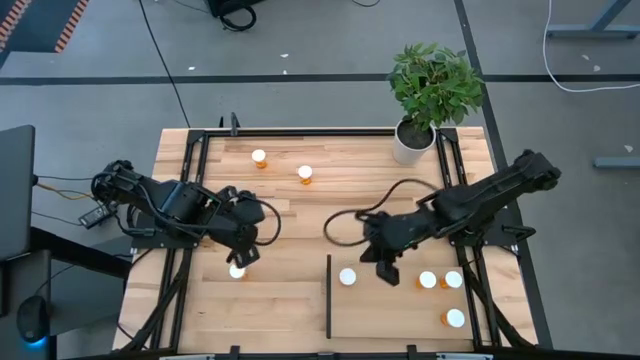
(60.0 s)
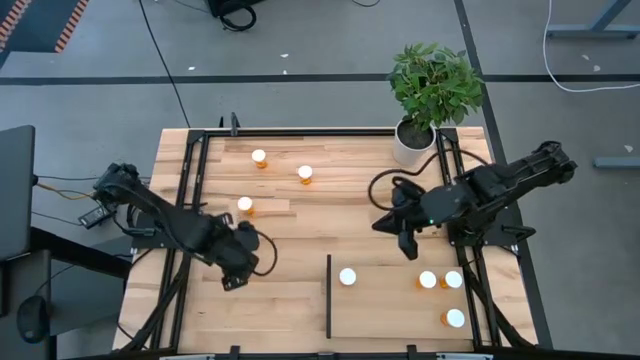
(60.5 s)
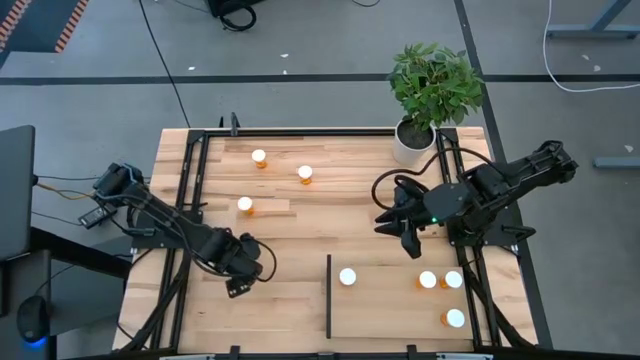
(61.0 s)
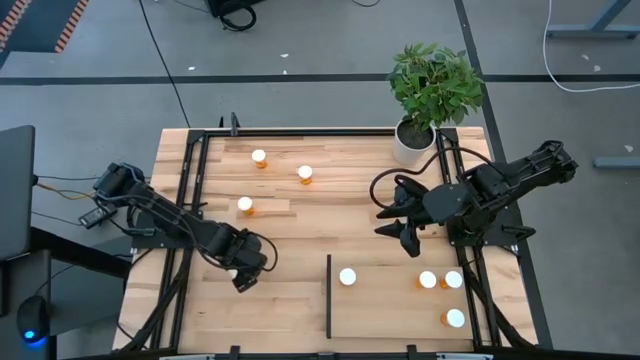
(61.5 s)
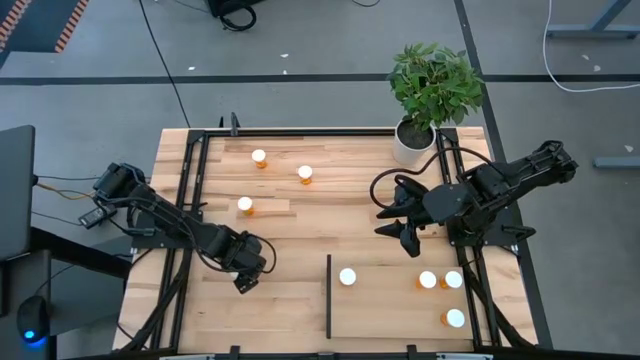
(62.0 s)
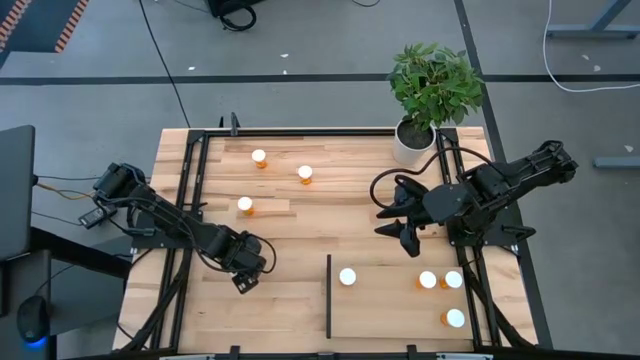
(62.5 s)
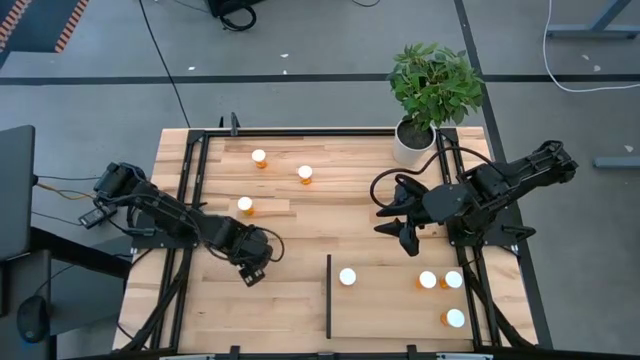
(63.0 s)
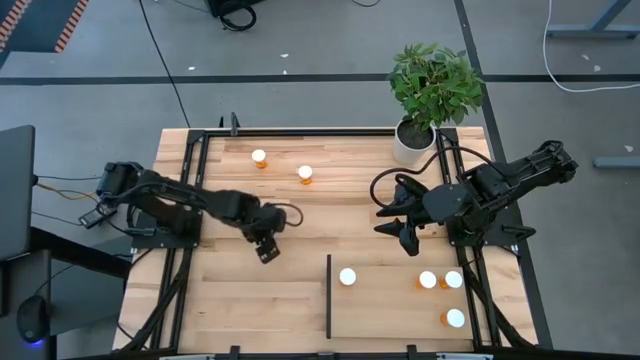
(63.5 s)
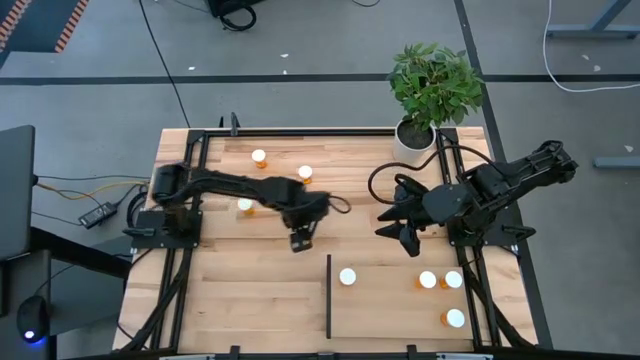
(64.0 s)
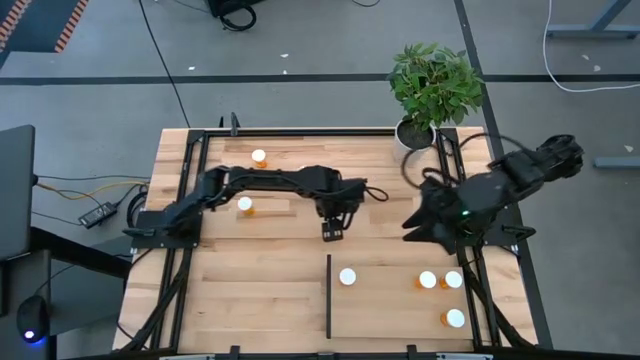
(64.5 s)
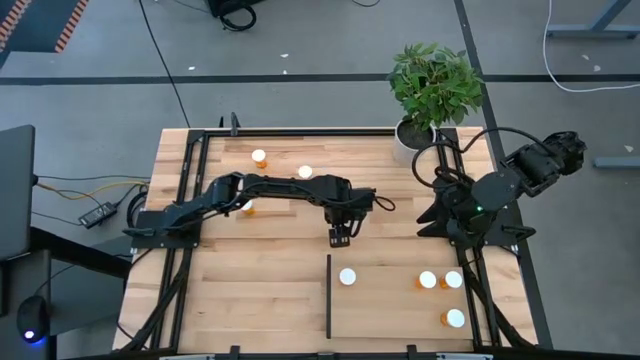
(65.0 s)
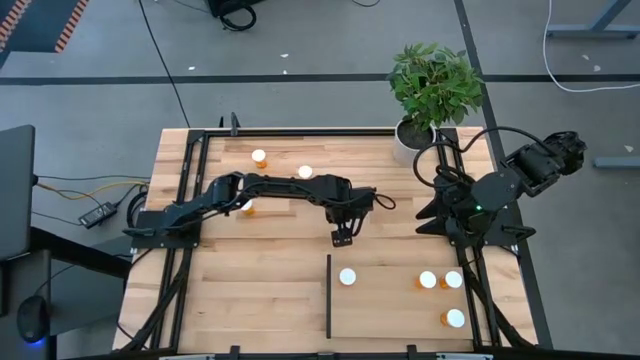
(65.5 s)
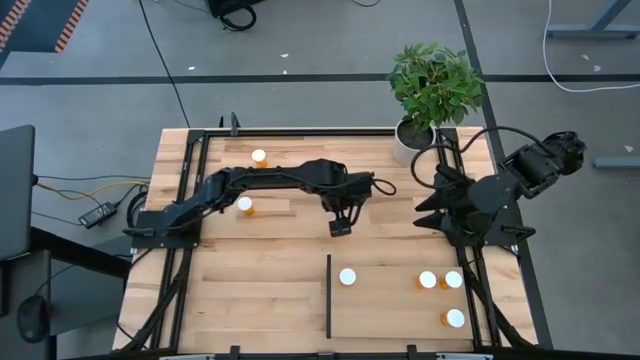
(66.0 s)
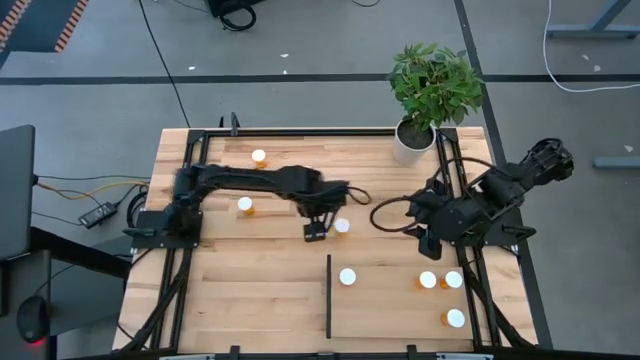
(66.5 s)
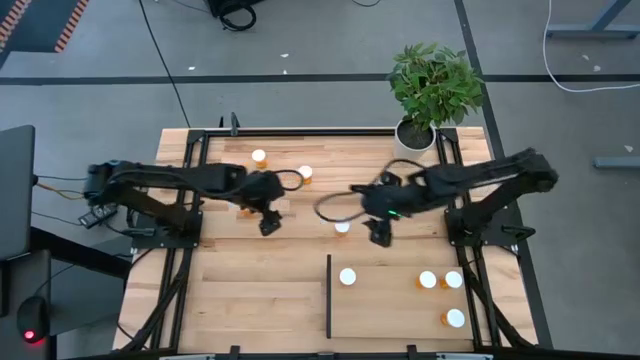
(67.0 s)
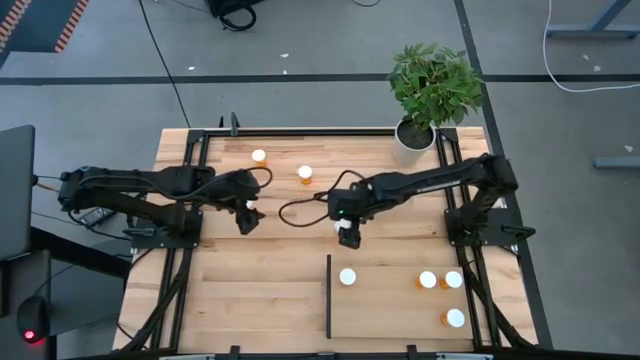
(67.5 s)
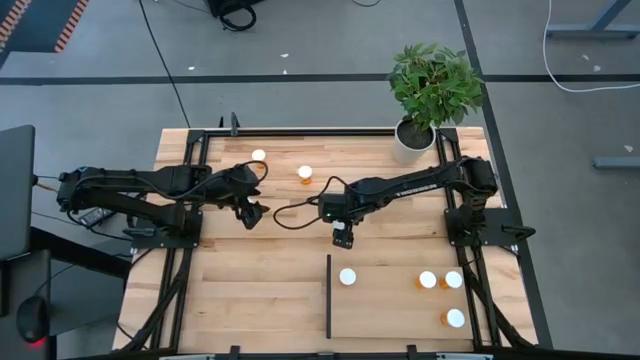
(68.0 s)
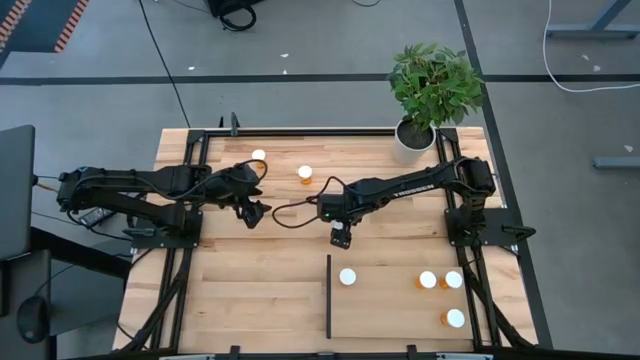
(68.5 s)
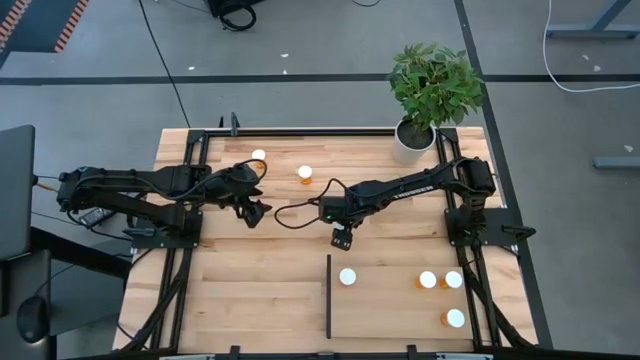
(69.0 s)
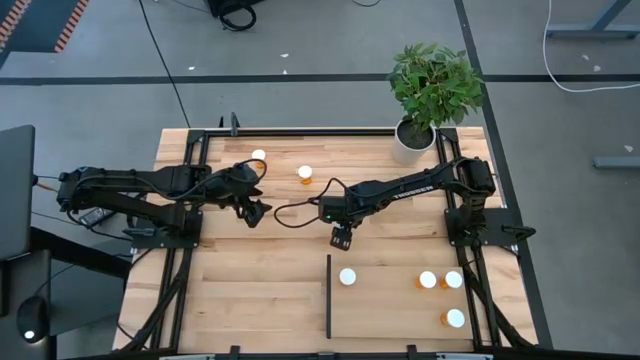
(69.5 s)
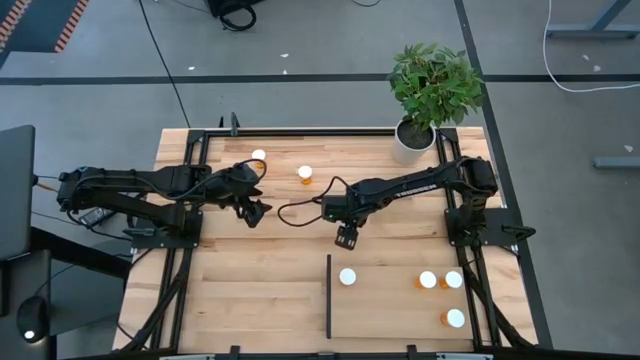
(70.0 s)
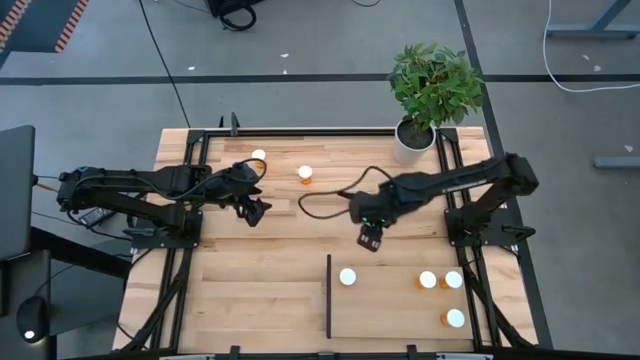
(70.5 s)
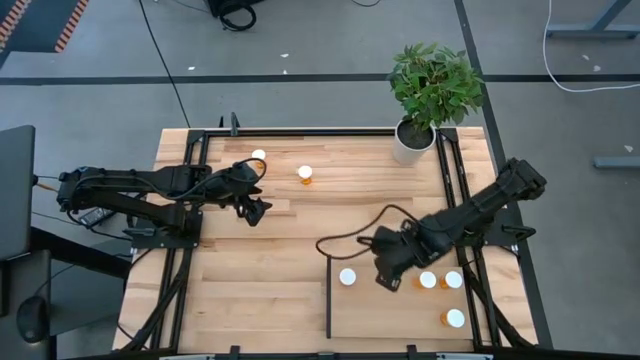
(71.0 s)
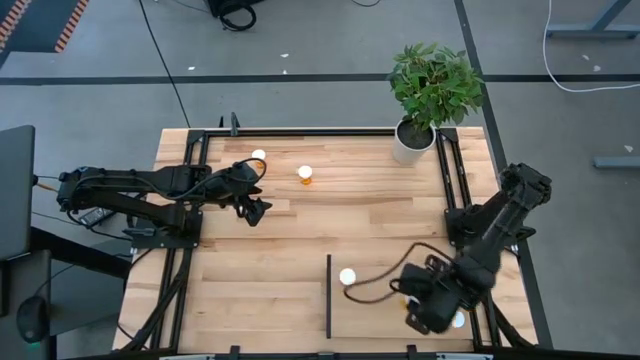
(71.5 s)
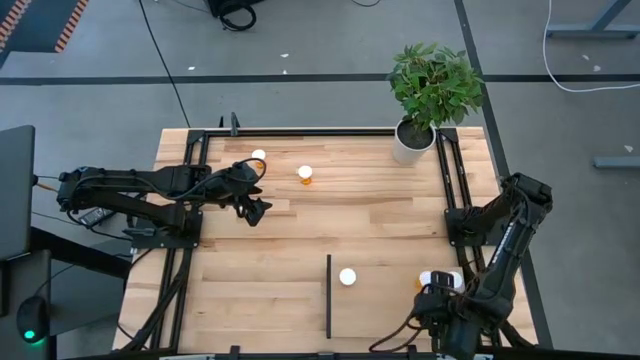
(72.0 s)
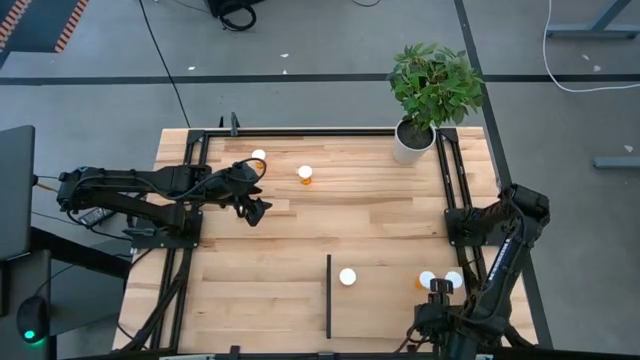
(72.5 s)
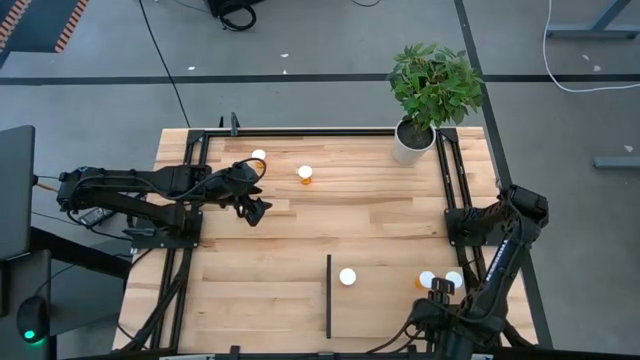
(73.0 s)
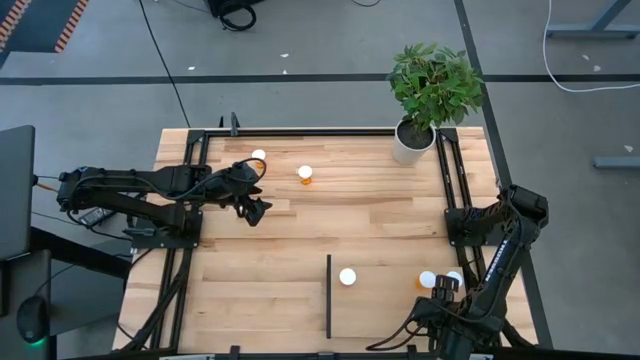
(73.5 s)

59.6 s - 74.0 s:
Task: Pick and place medicine bottles onto shelf by color
Put the orange pill bottle on the shelf aligned with the other orange pill bottles

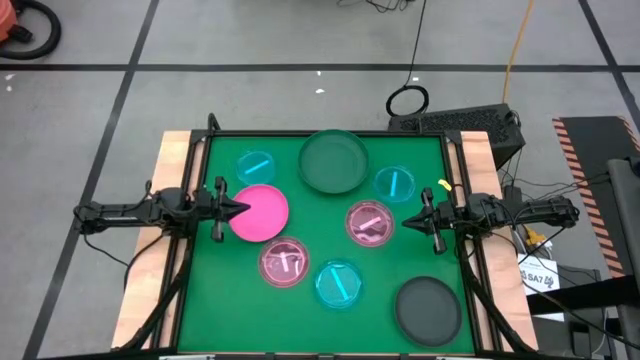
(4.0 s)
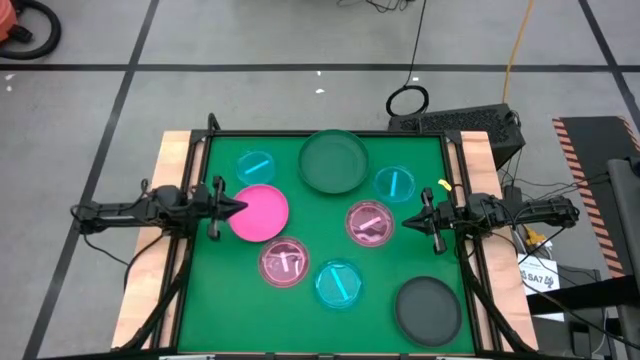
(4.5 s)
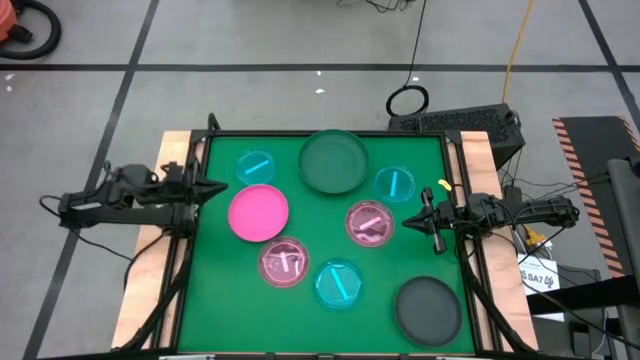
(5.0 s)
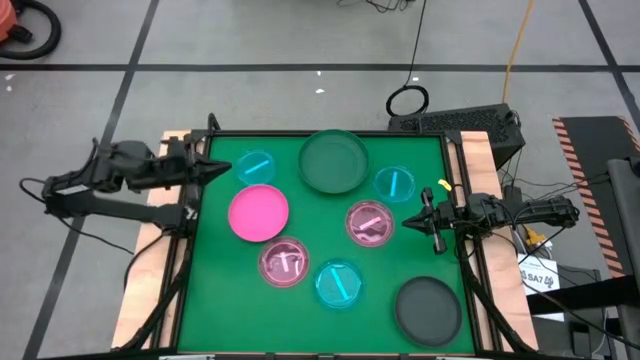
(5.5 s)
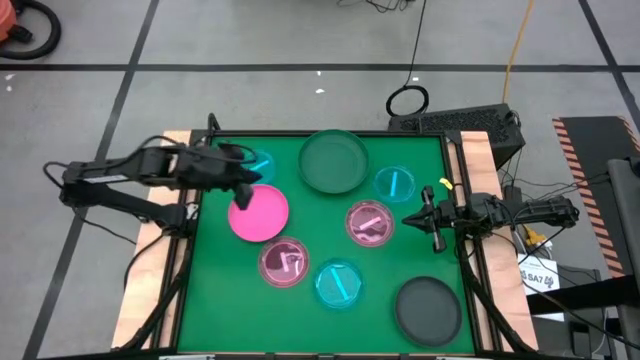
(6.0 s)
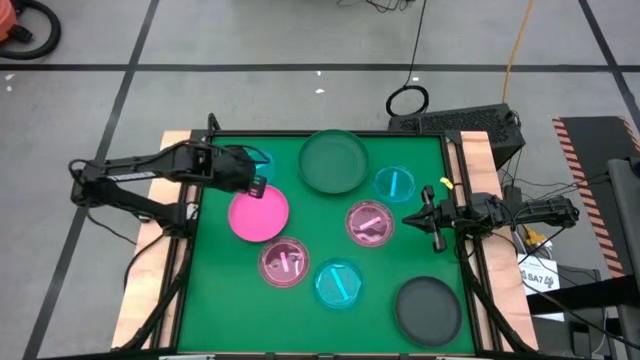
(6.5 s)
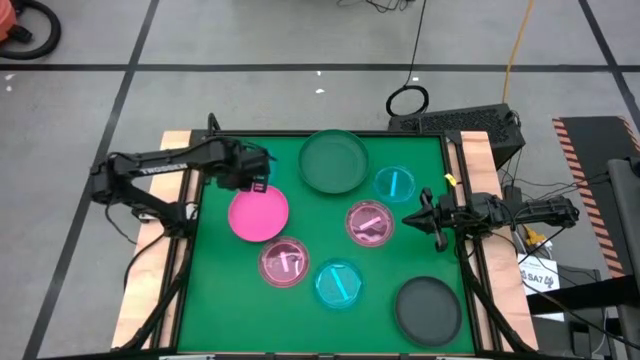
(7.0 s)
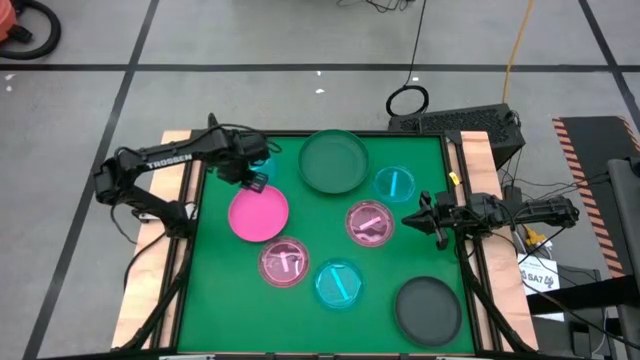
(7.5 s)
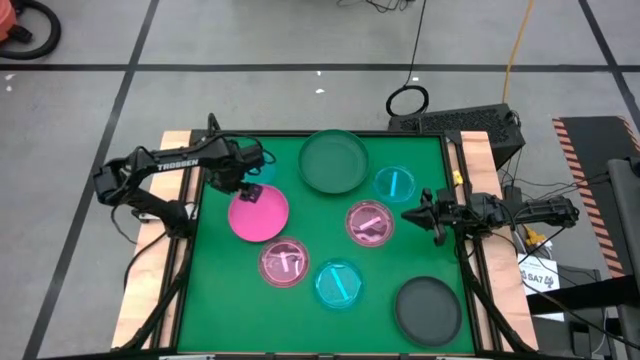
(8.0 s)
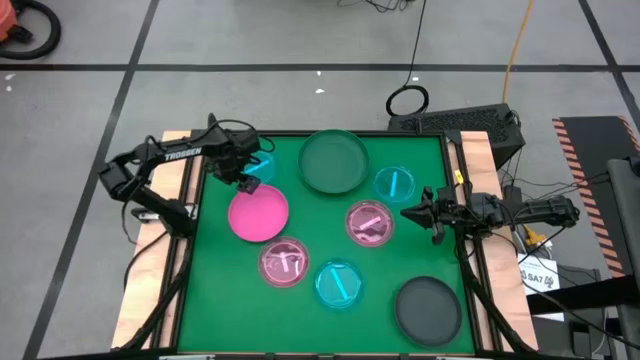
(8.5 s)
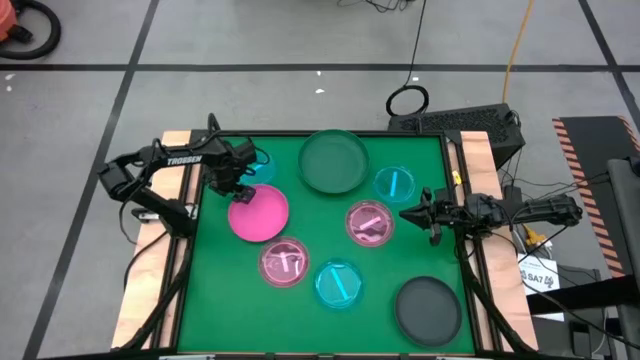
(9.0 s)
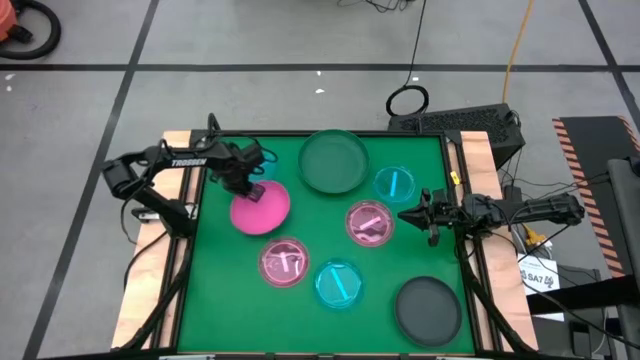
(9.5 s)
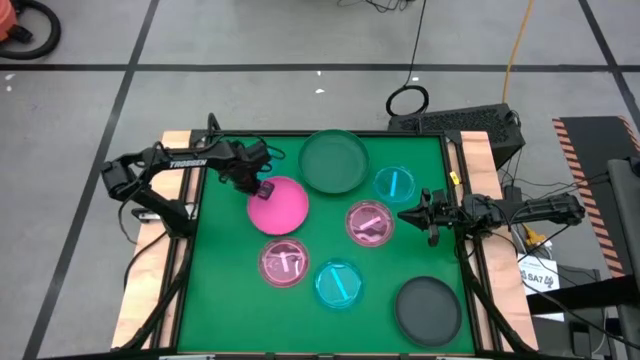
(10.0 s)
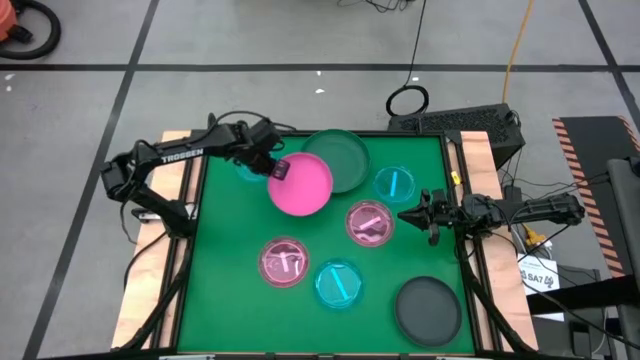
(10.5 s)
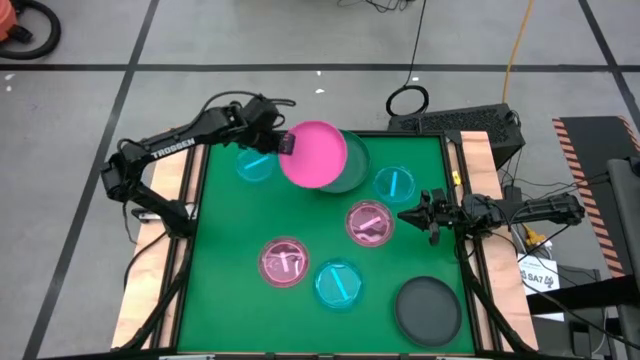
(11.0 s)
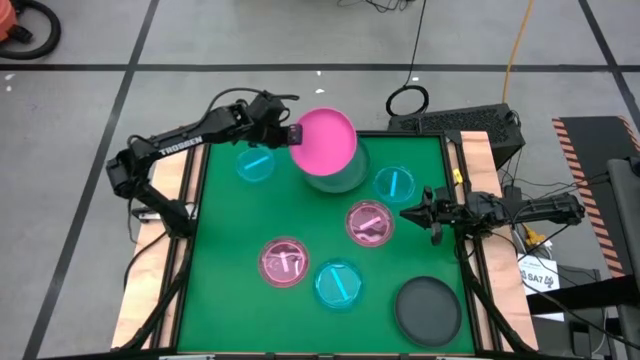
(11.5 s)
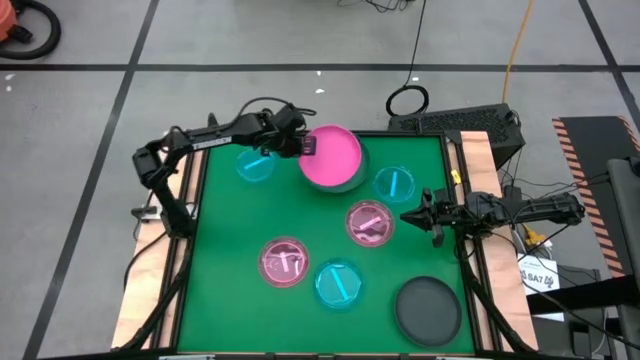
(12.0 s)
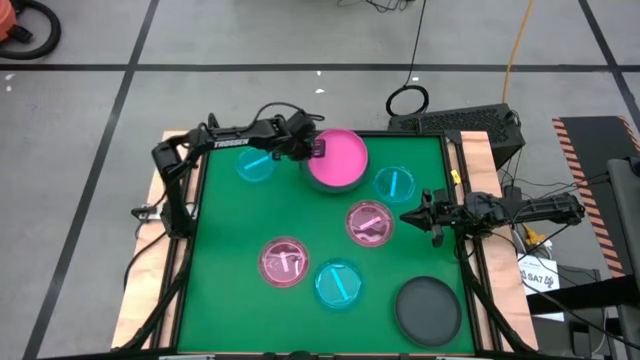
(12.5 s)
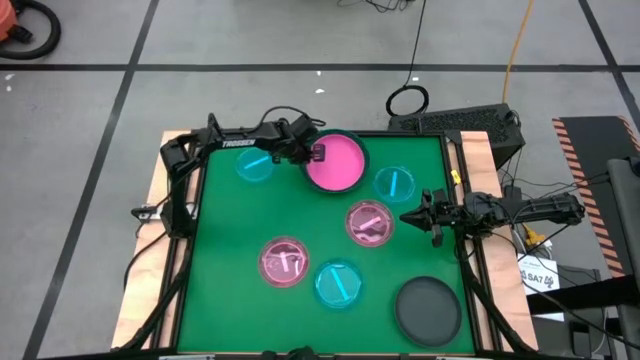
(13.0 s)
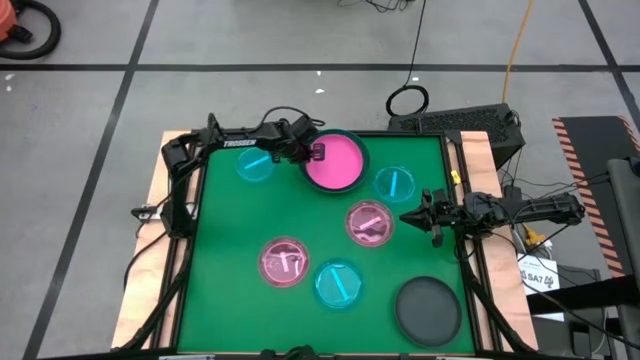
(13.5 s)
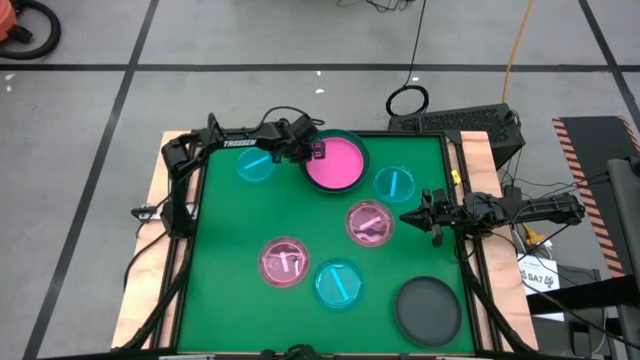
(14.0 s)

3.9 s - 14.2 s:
Task: Stack plastic plates
Stack the light pink plate on top of the dark green plate
